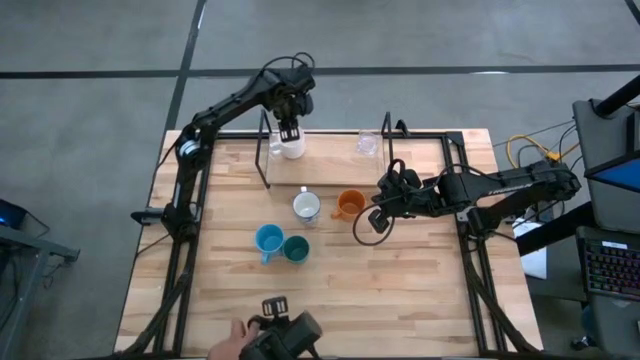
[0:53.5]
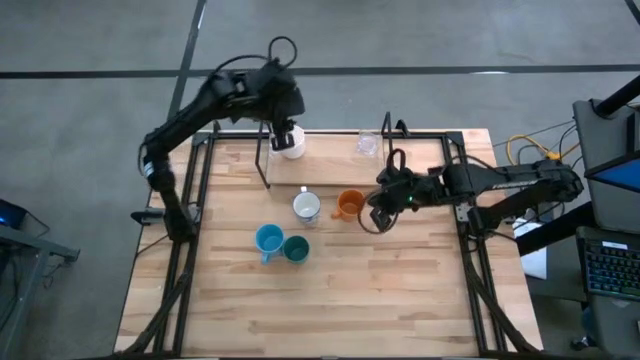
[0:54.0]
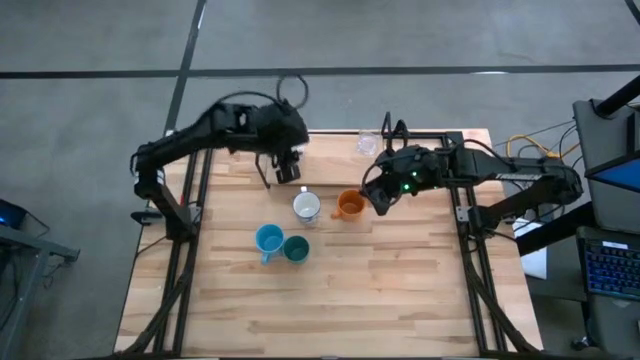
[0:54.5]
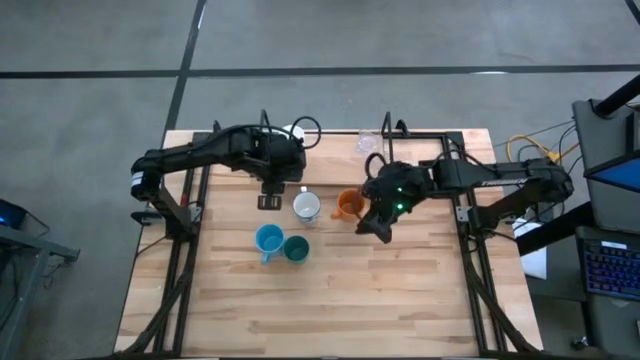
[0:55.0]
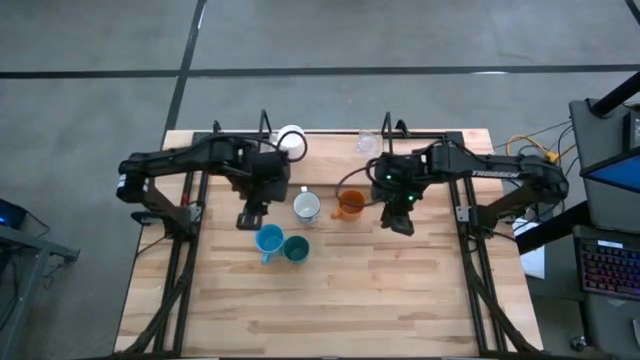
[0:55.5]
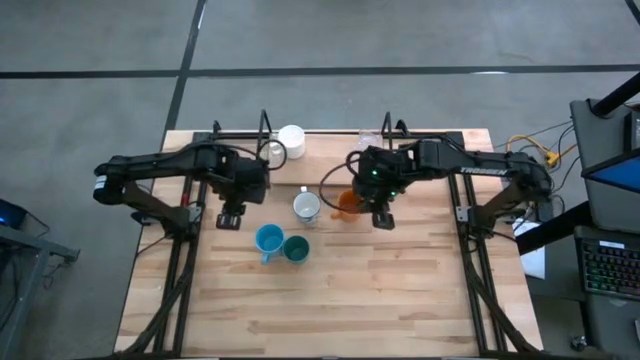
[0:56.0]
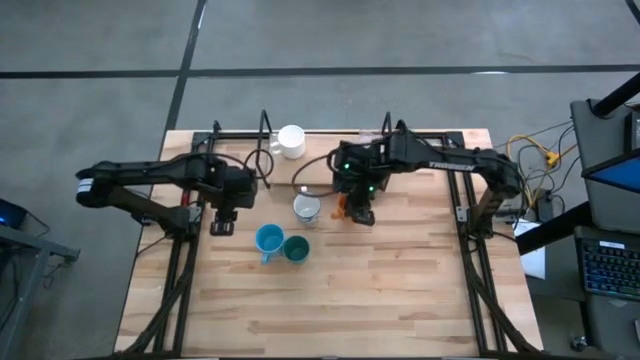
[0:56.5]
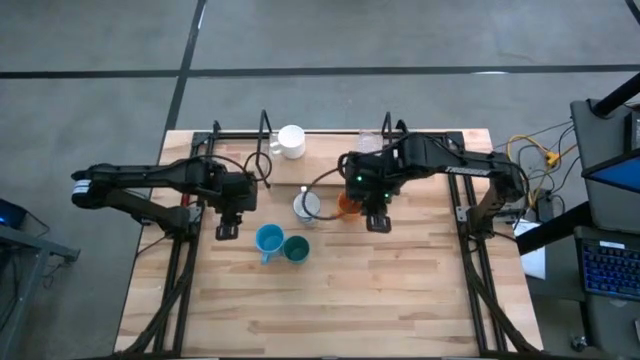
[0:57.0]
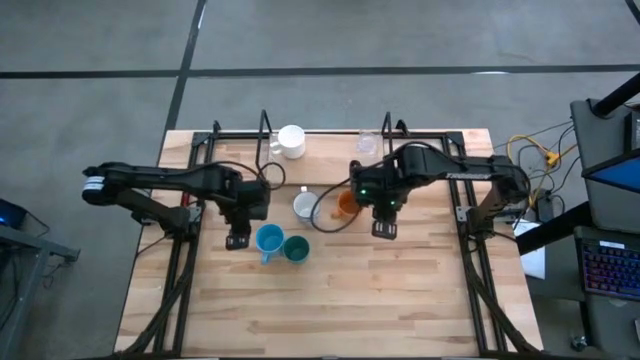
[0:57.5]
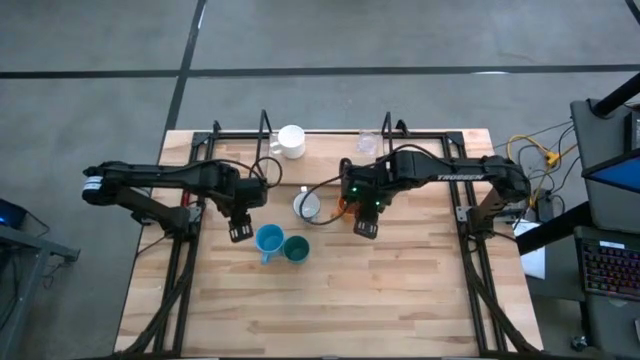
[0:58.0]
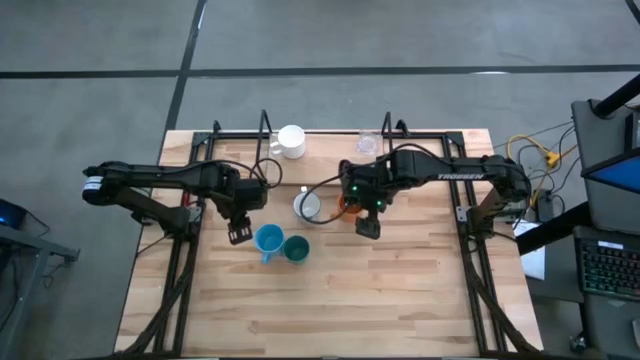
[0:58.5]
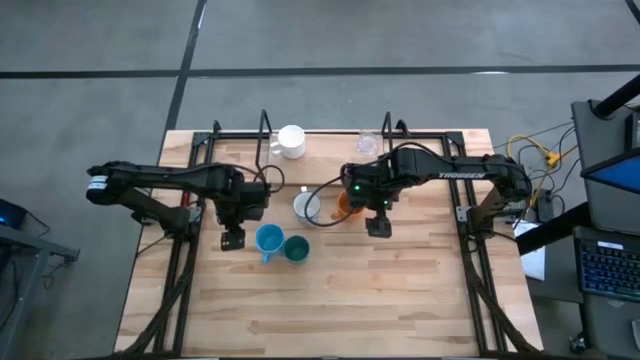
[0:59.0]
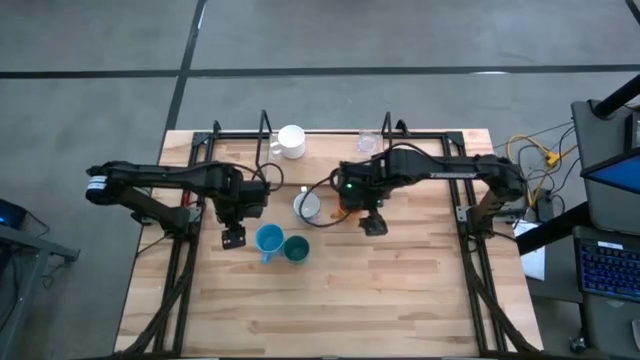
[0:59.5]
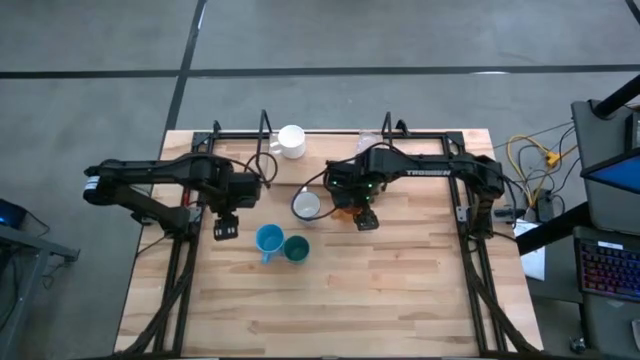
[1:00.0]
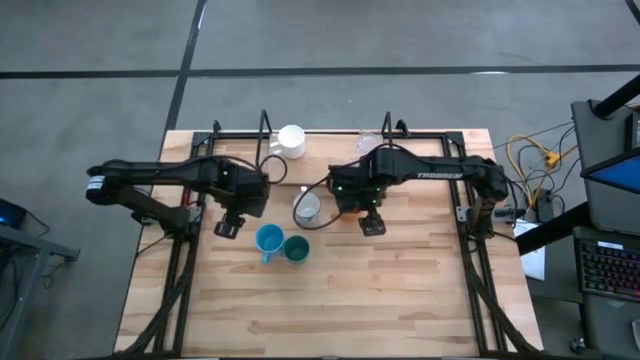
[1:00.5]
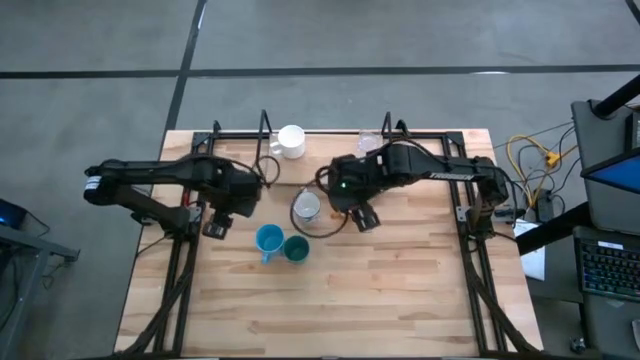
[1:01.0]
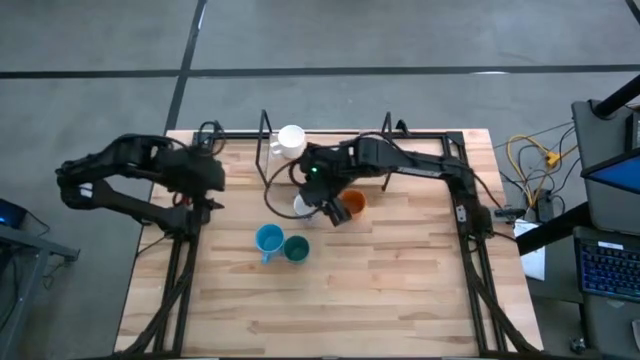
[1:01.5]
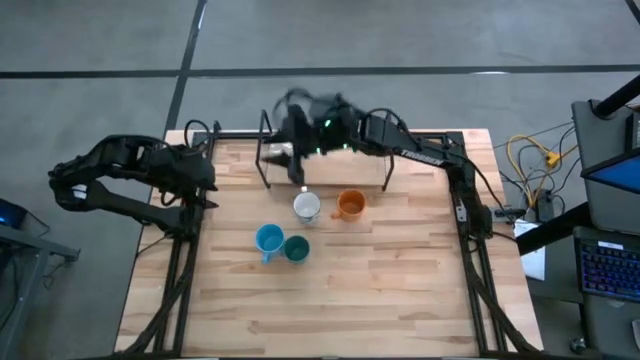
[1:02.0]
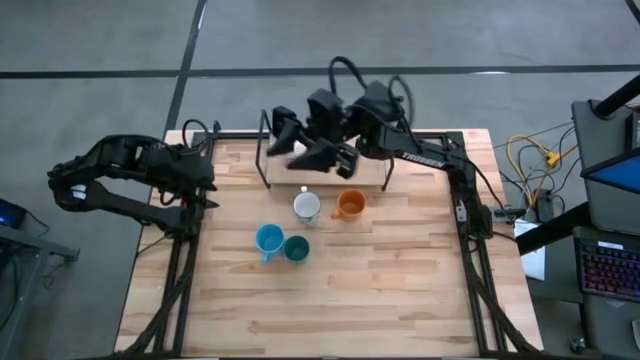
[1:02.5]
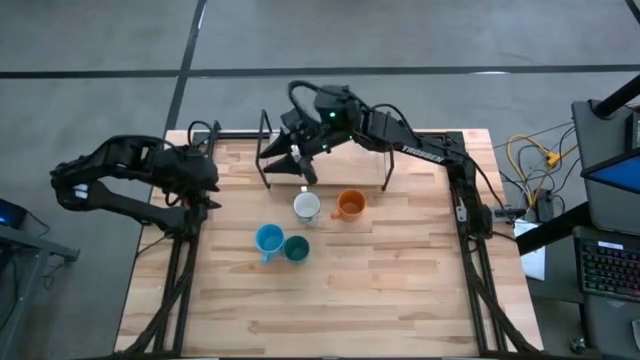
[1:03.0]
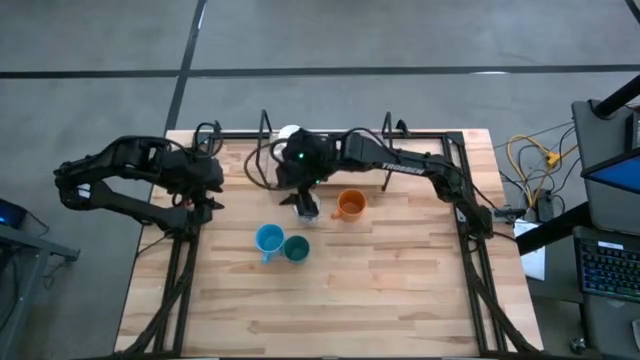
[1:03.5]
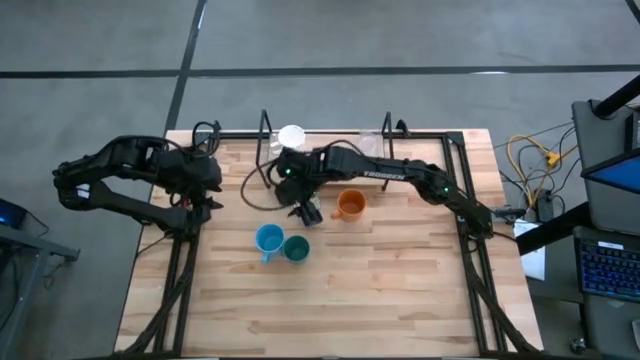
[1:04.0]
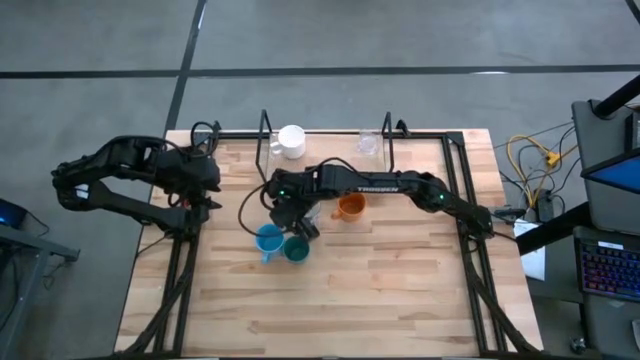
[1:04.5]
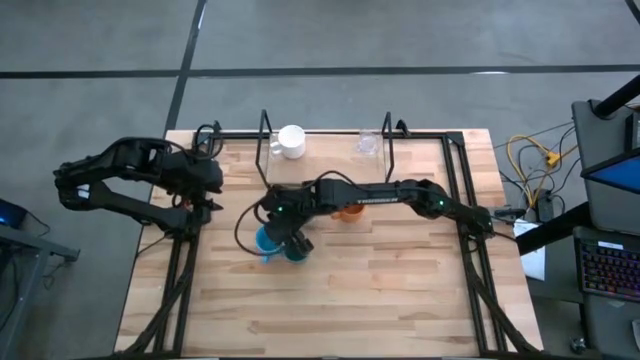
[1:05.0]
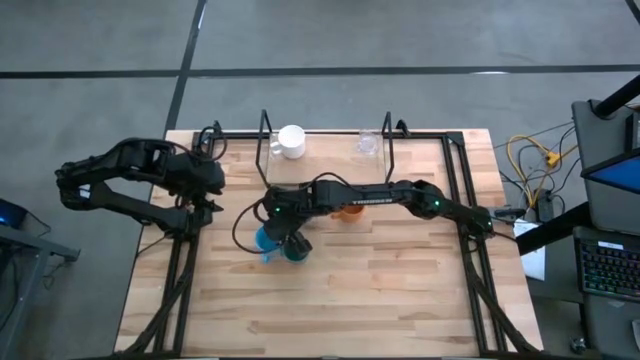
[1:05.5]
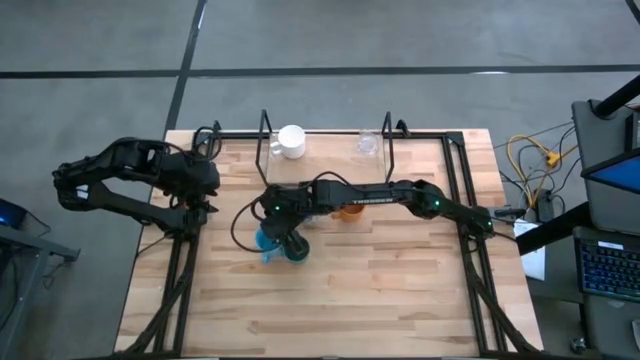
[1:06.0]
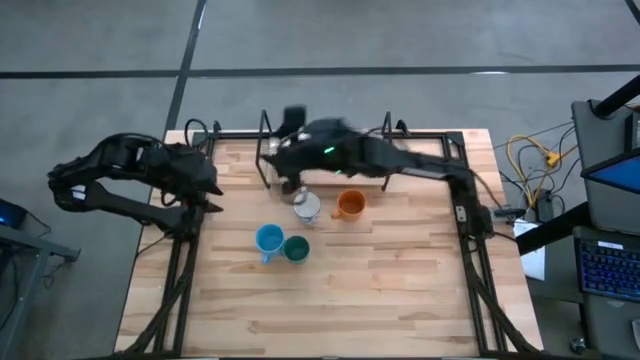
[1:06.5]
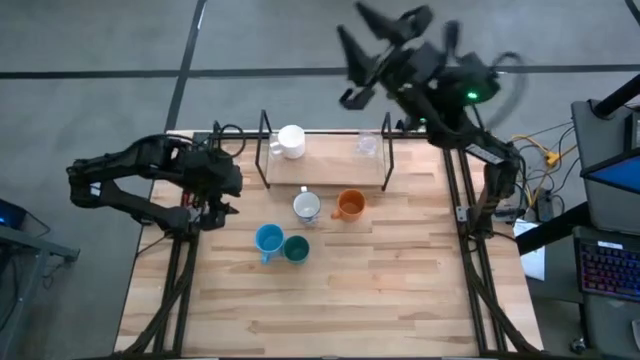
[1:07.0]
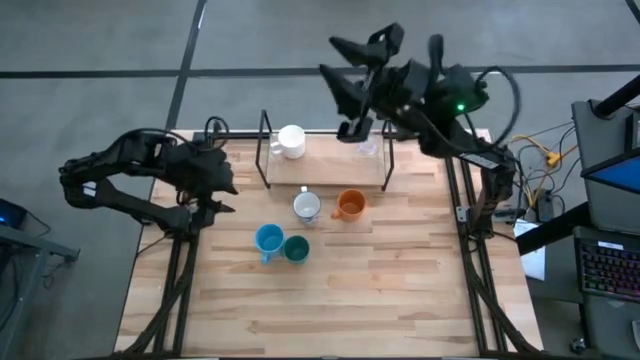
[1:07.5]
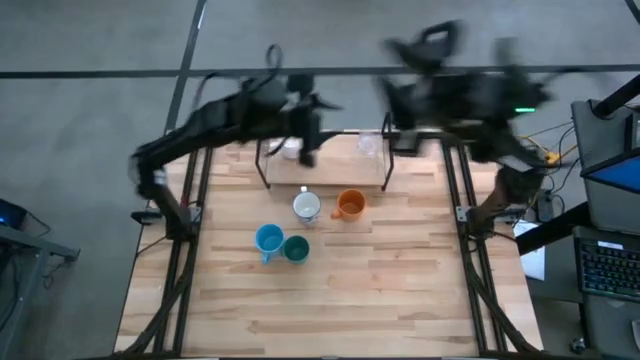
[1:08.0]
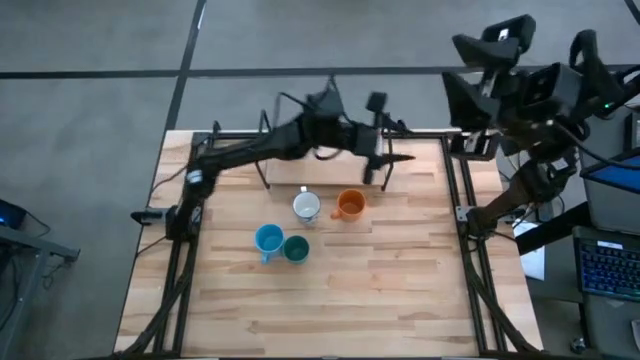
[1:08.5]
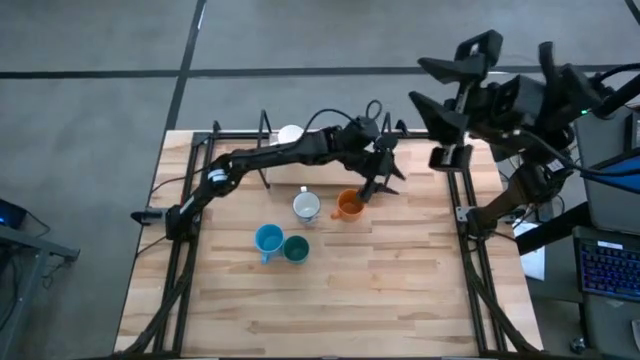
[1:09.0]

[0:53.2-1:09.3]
Task: Stack small to large cups/mugs on shelf
Put the light blue mug on the shelf

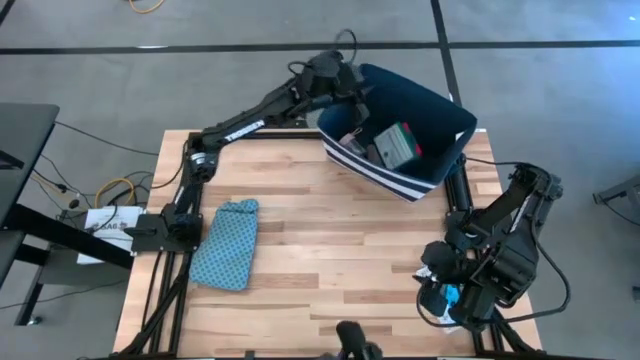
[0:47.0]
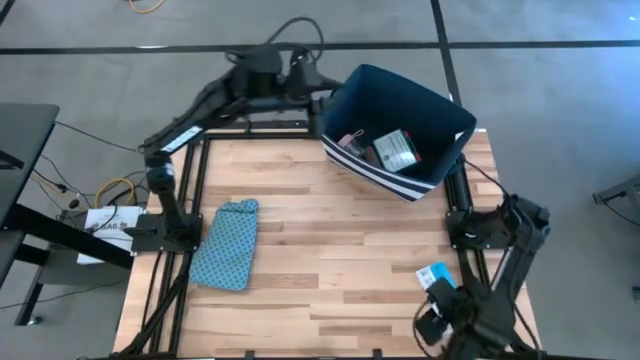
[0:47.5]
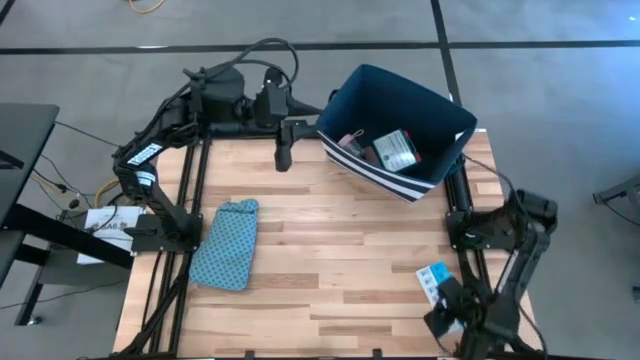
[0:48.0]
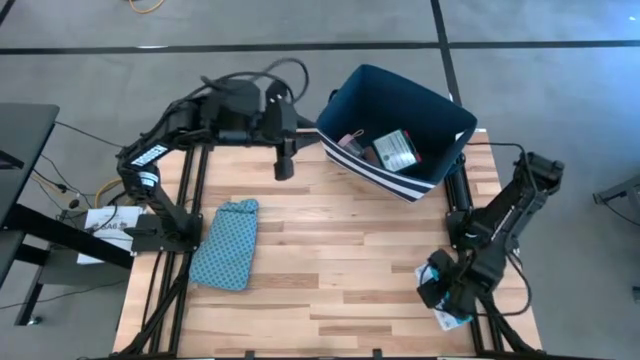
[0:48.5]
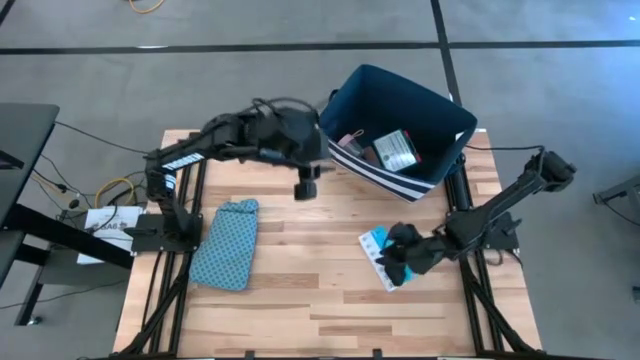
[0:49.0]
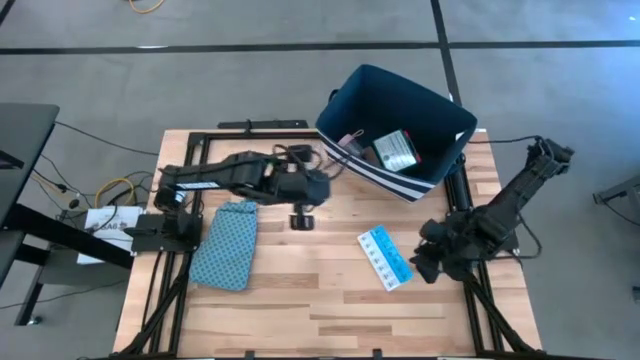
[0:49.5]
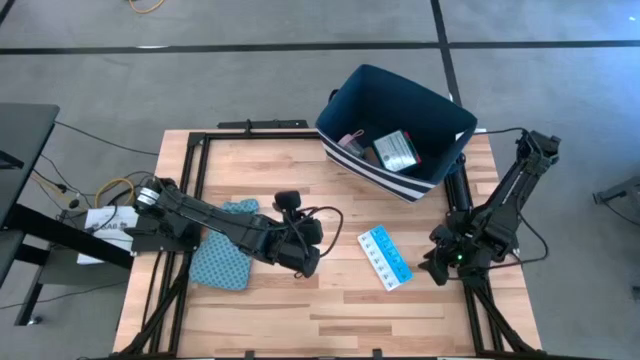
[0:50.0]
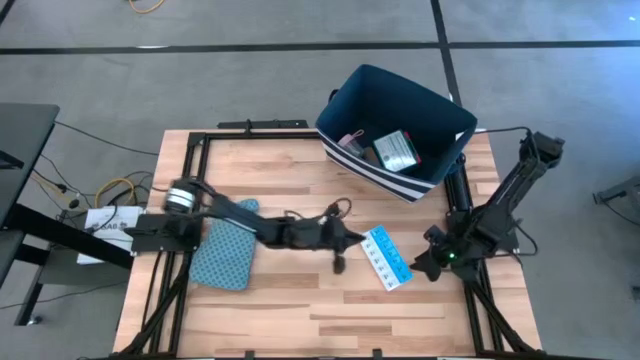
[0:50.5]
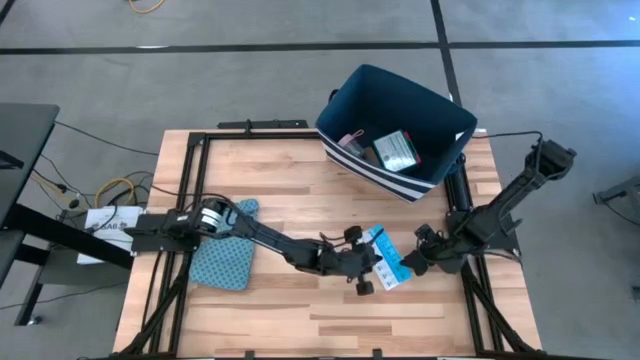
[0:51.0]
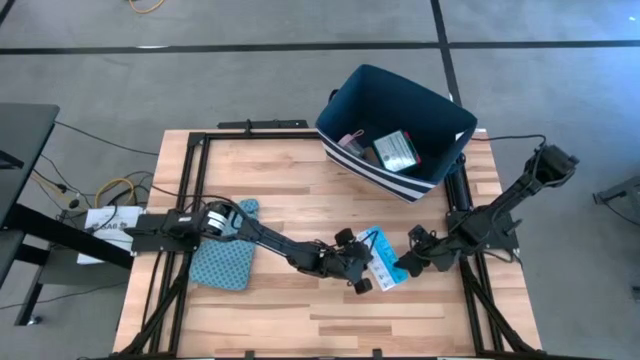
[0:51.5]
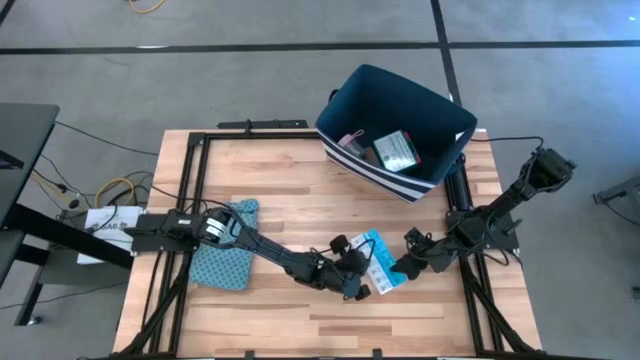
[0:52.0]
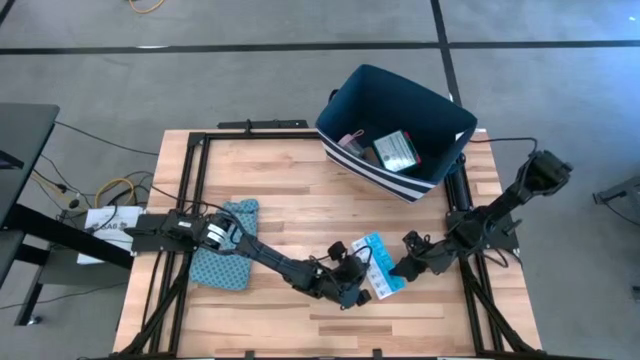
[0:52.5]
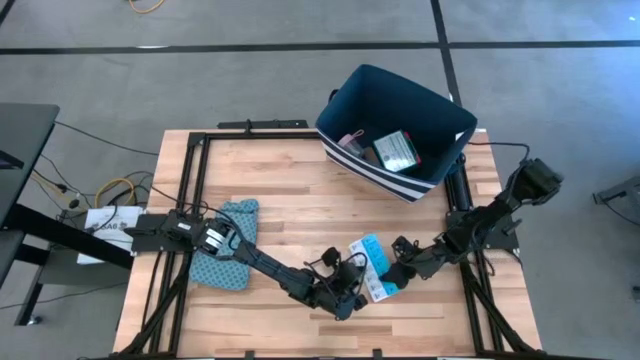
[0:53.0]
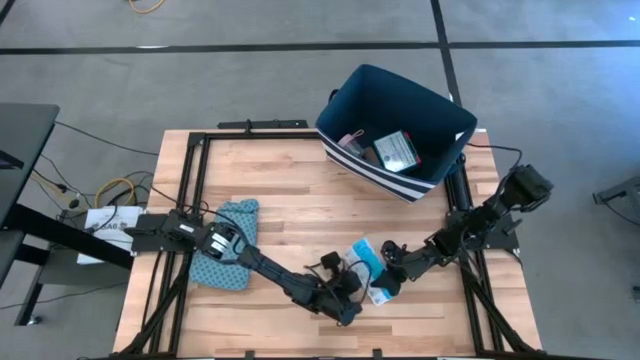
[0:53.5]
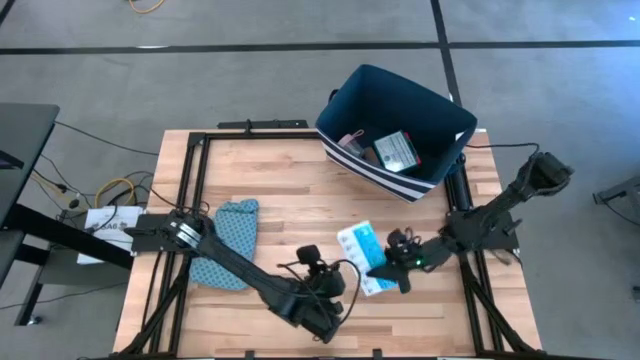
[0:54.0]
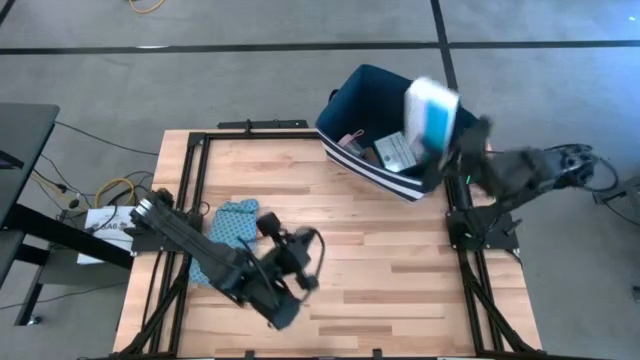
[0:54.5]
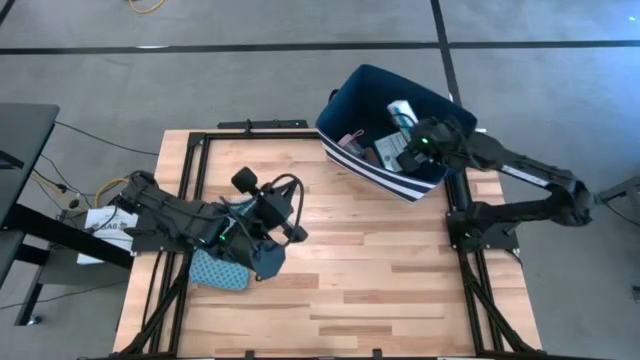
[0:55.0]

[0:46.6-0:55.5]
Task: Pick & place medical supplies in basket/bin
Put the medicine organizer into the blue organizer bin
